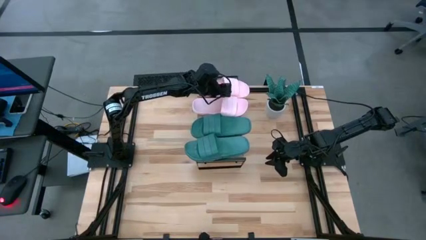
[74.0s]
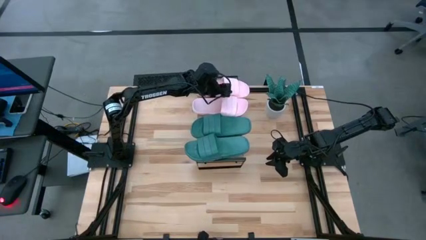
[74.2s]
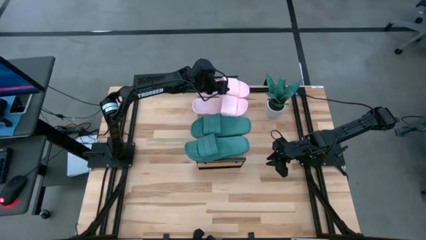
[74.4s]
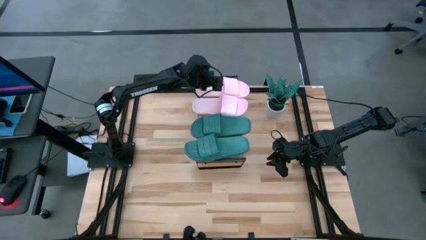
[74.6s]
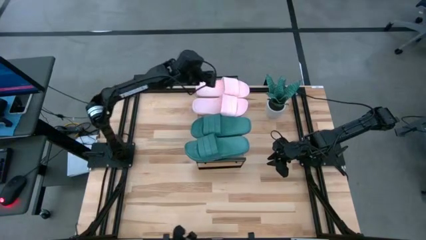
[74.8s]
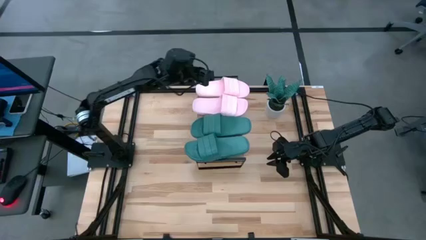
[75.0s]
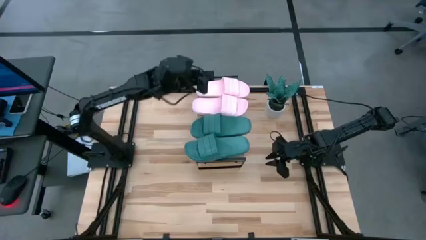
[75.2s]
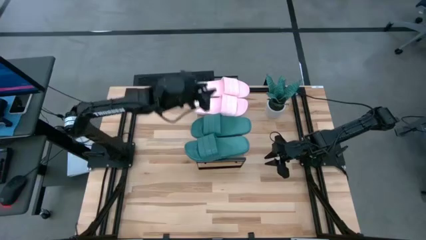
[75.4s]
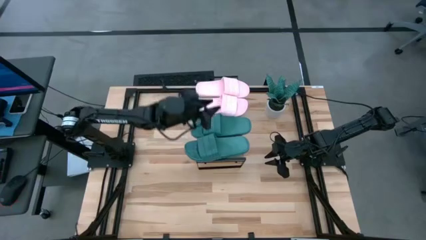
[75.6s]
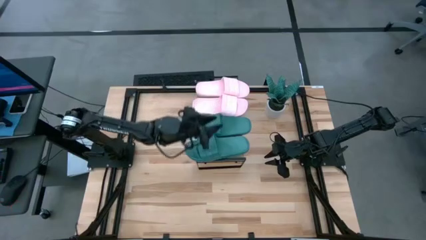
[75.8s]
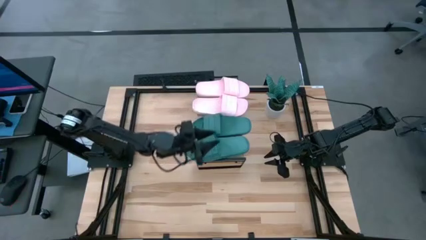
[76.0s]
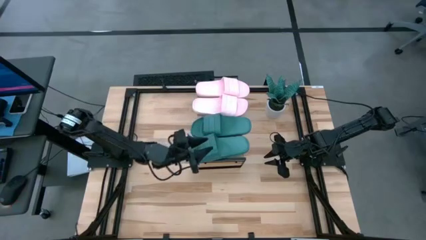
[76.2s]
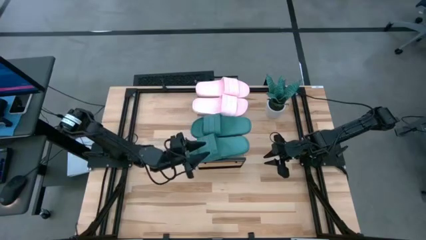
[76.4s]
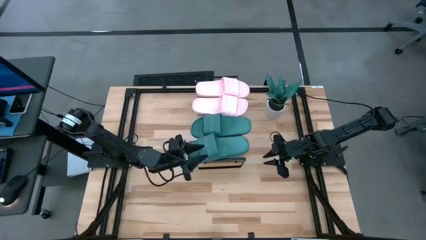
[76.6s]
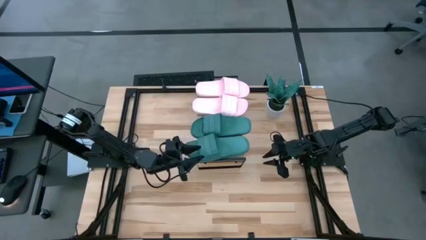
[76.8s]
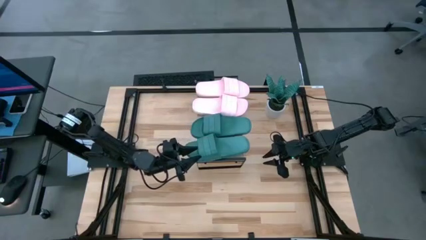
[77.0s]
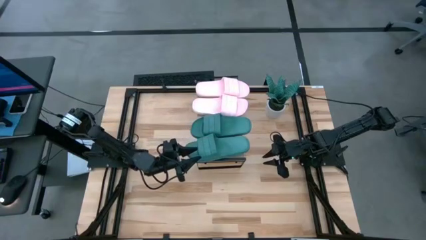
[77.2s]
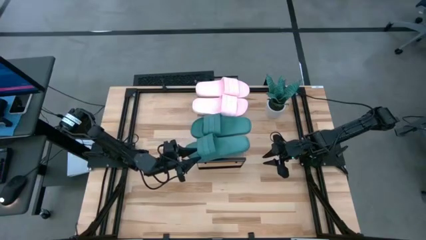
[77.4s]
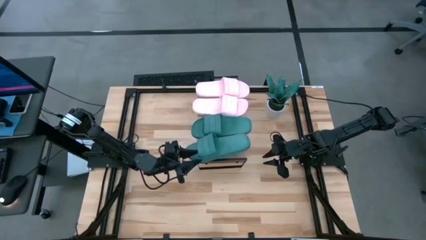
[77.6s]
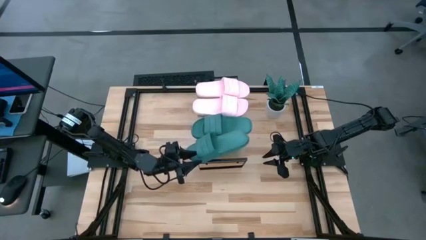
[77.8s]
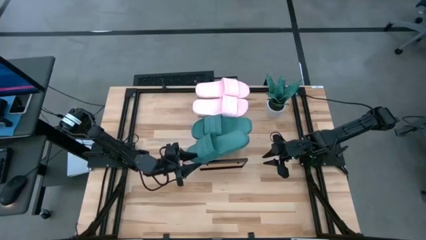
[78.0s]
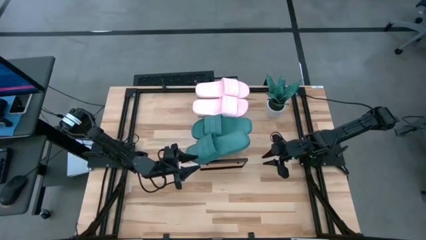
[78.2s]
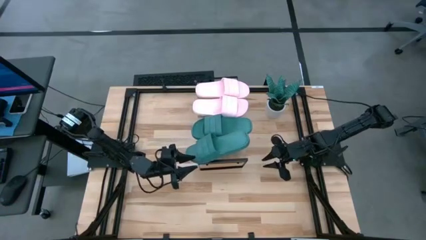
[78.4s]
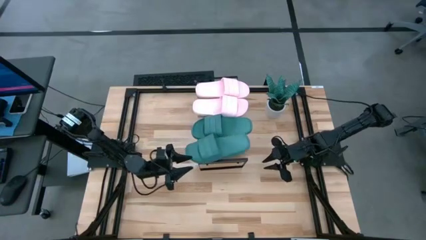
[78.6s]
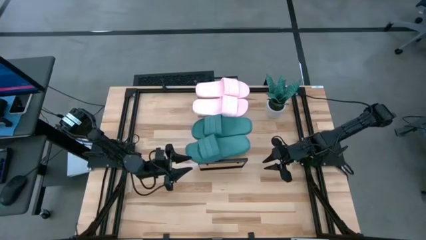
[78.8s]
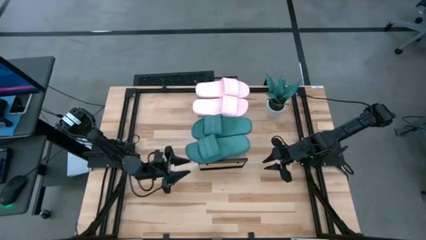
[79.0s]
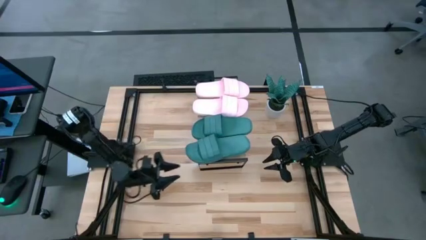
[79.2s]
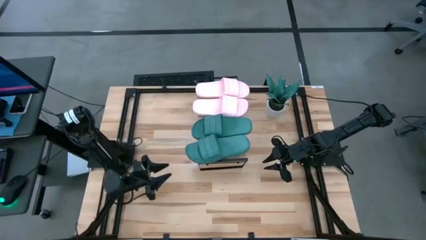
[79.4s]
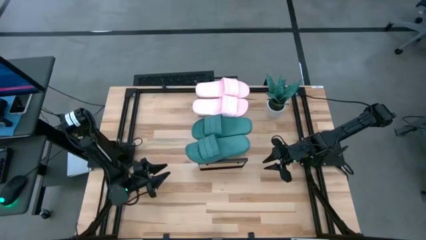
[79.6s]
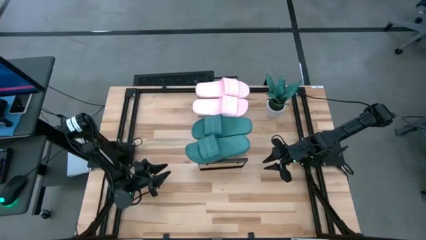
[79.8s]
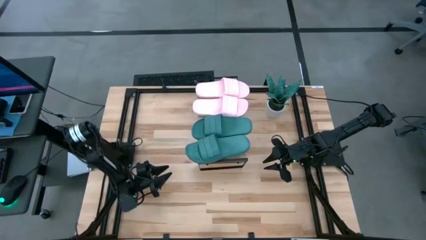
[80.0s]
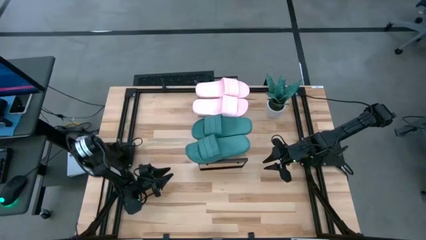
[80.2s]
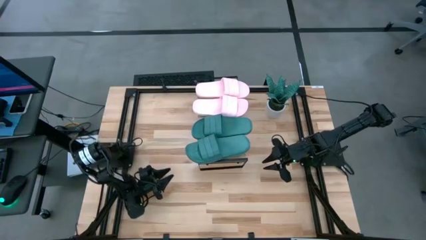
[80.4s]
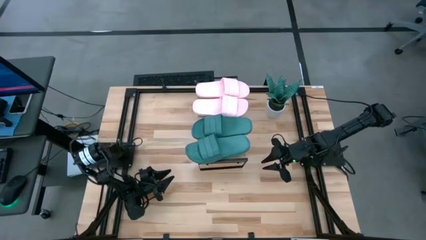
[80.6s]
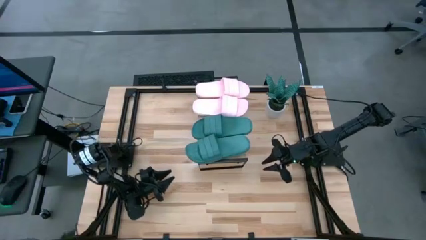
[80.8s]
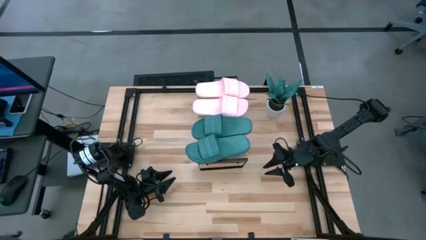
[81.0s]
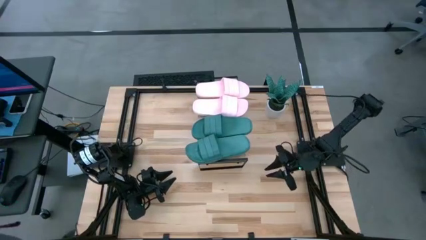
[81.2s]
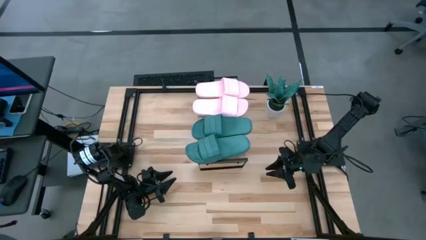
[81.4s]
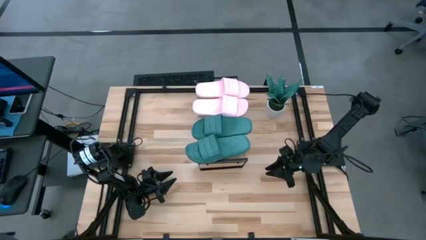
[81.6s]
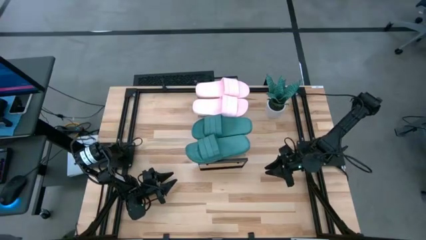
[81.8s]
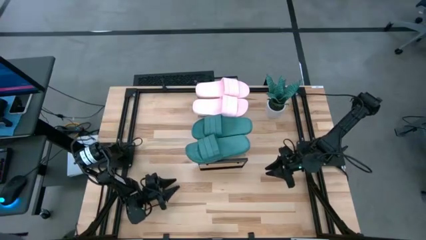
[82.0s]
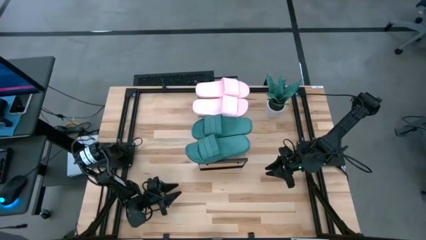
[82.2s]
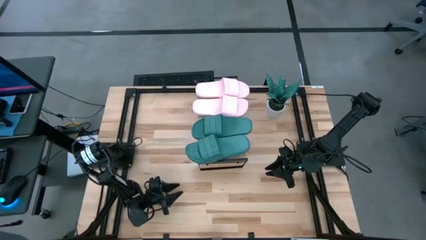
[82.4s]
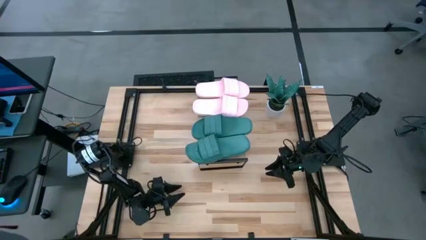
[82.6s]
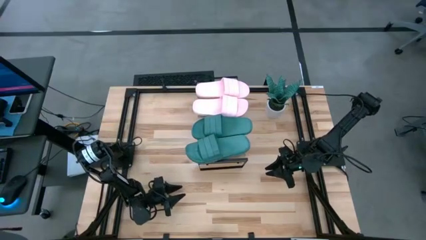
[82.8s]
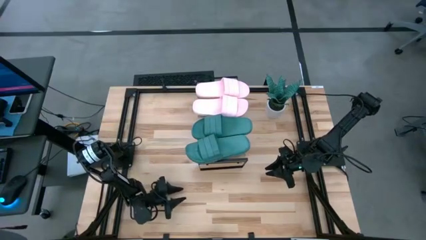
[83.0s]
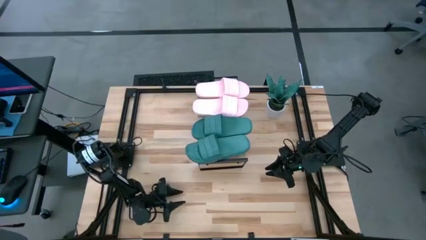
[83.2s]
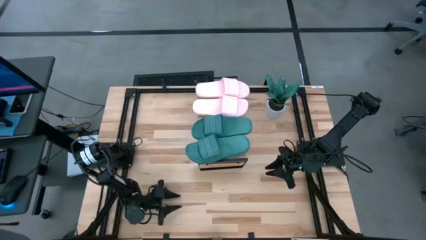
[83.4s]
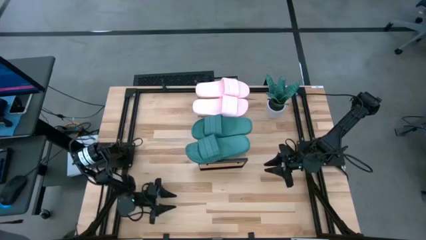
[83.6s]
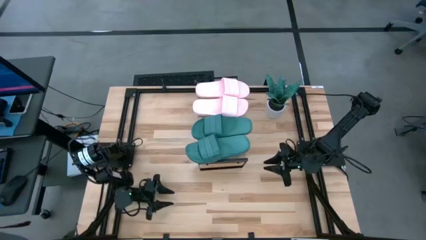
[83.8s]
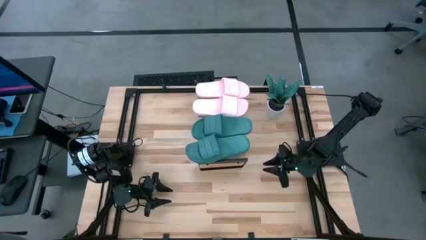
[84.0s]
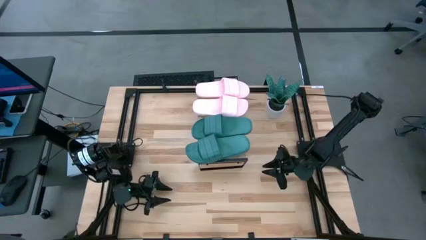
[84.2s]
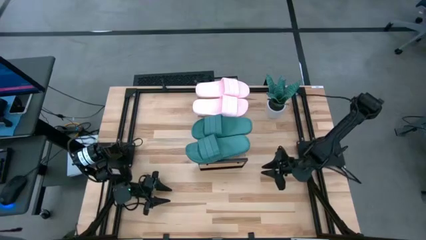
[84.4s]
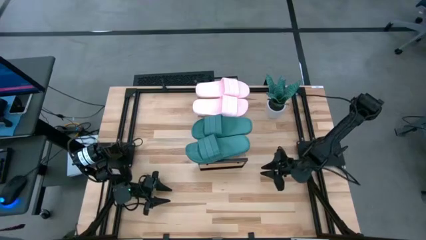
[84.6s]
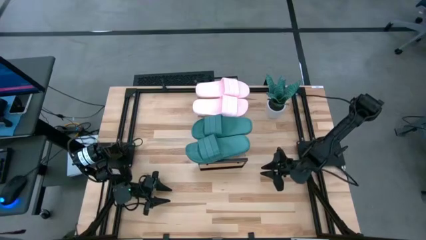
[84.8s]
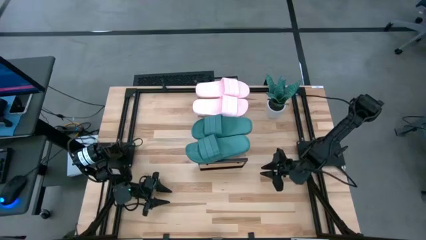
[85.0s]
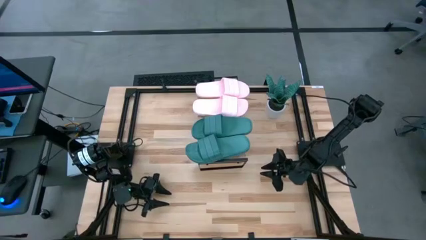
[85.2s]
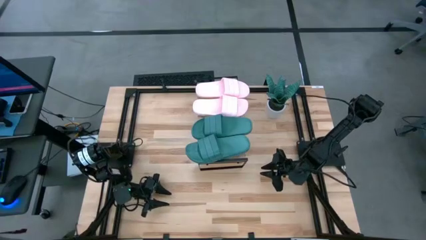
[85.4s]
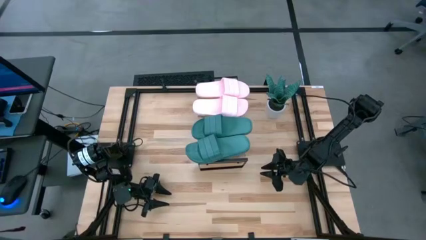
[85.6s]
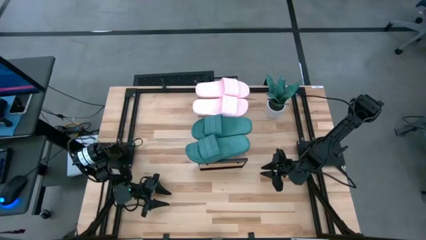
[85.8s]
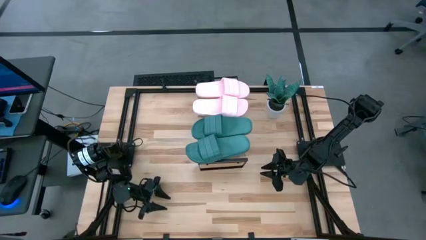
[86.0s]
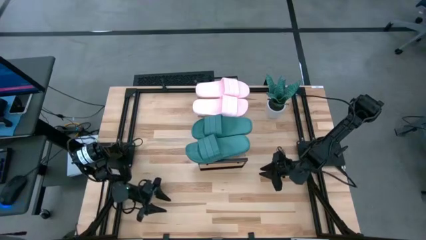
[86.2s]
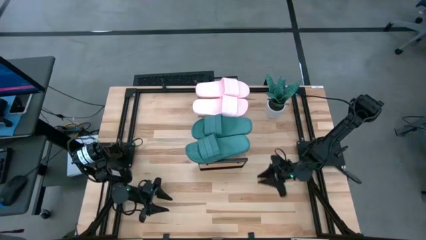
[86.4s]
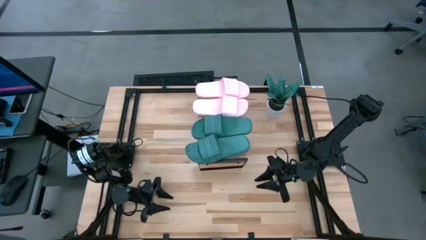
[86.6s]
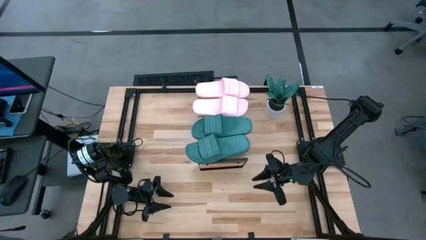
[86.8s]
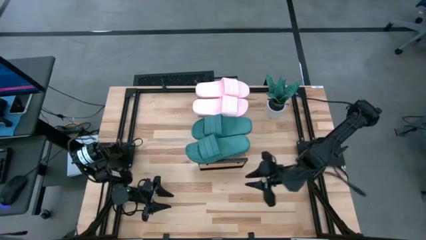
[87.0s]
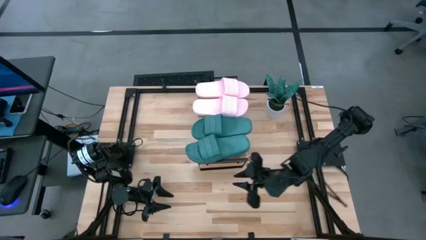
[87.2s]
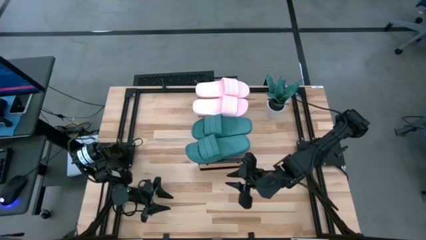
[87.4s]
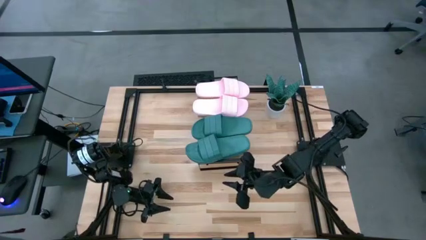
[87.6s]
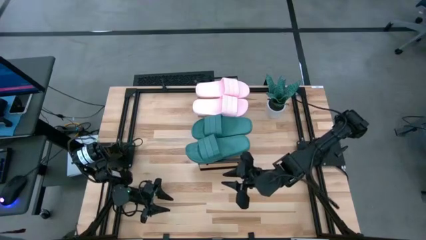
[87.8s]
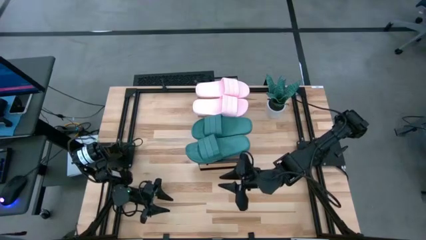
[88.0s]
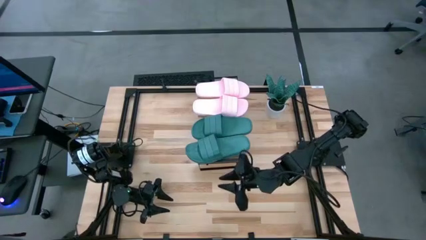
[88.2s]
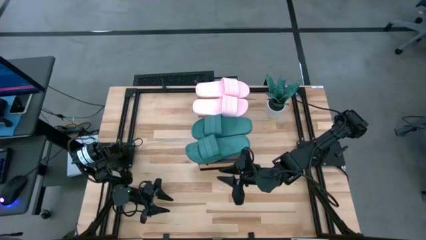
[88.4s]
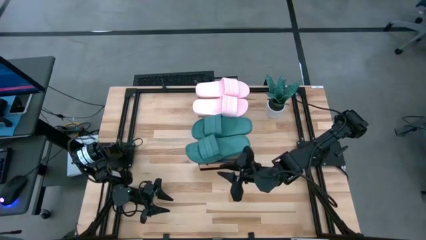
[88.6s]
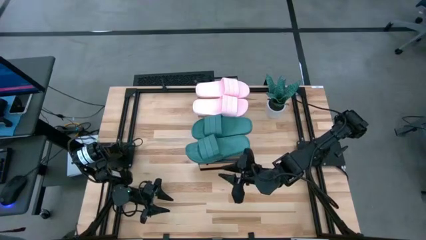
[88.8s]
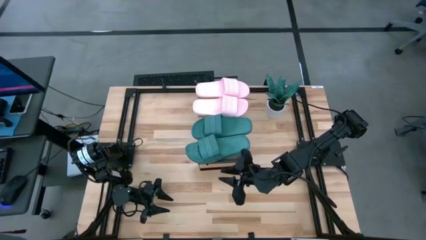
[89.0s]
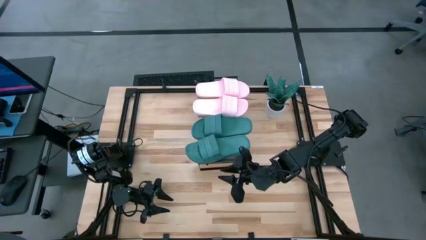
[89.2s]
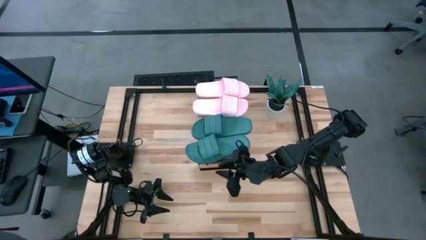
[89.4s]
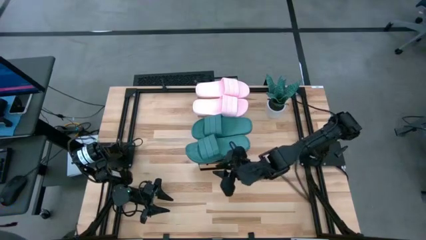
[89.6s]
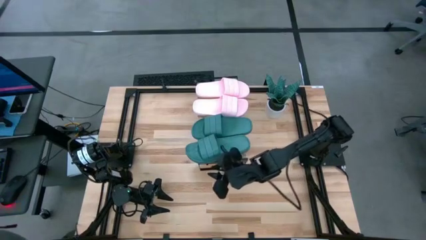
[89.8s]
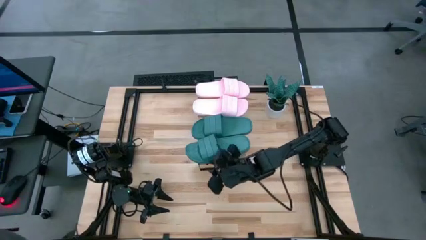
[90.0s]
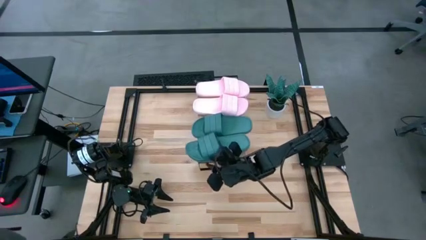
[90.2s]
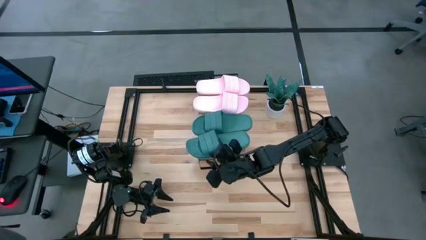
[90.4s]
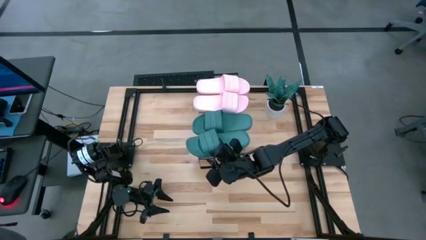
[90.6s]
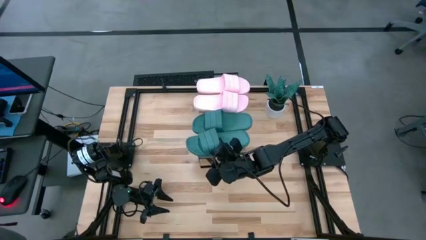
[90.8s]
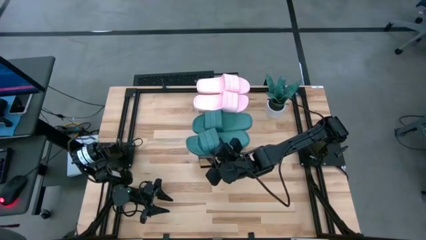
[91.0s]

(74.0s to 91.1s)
Task: Pick and place slides into the shelf
Adjust the slides on the shelf
